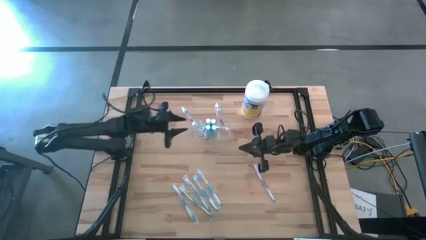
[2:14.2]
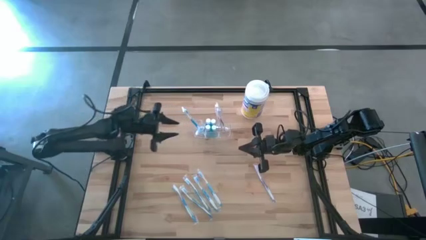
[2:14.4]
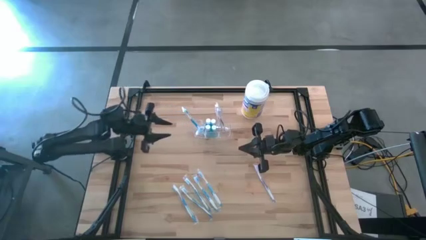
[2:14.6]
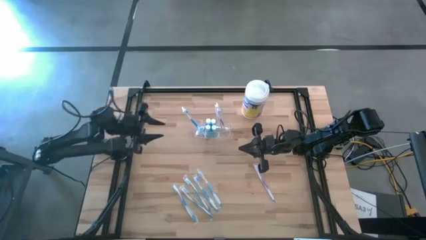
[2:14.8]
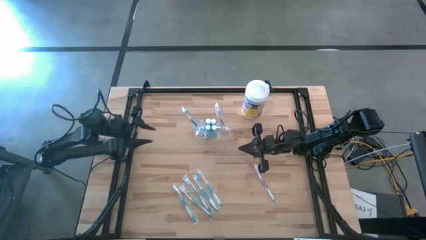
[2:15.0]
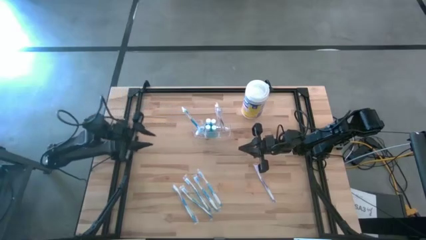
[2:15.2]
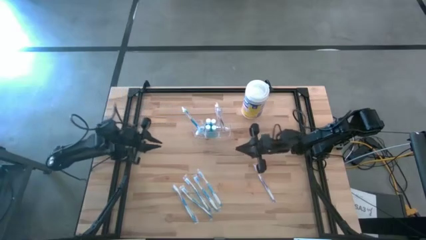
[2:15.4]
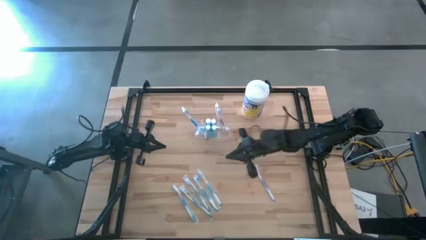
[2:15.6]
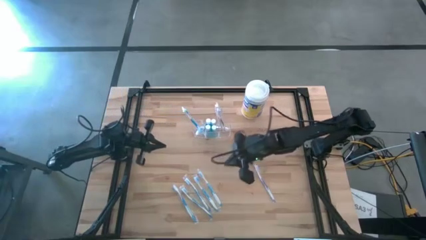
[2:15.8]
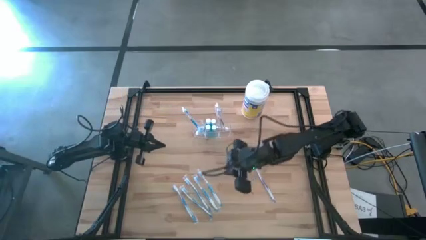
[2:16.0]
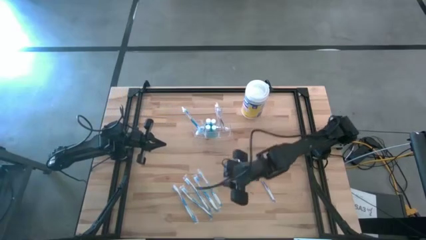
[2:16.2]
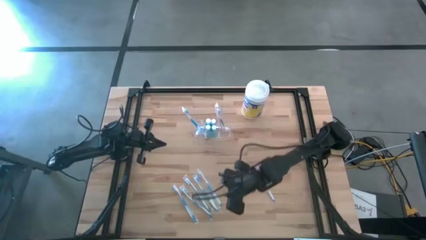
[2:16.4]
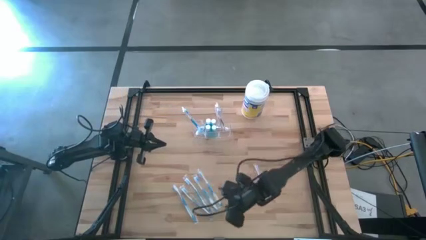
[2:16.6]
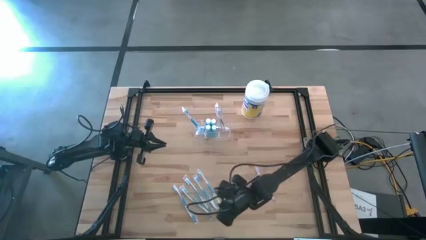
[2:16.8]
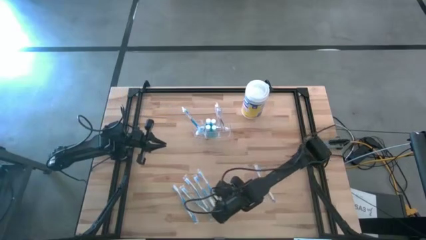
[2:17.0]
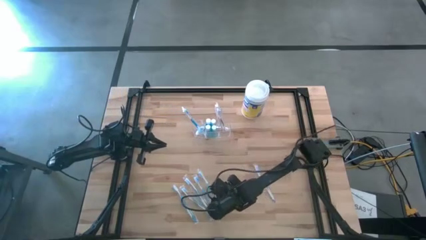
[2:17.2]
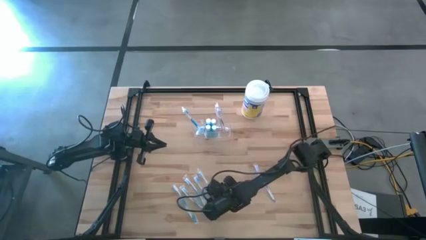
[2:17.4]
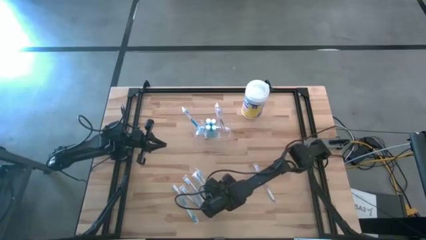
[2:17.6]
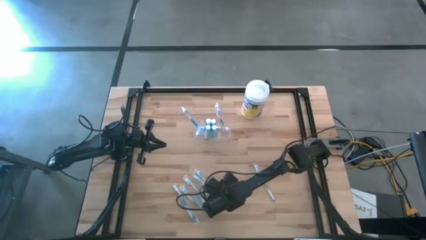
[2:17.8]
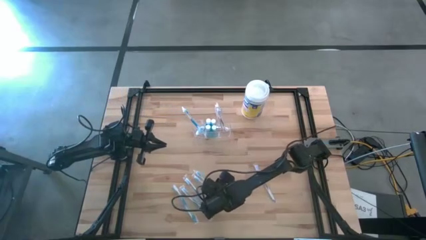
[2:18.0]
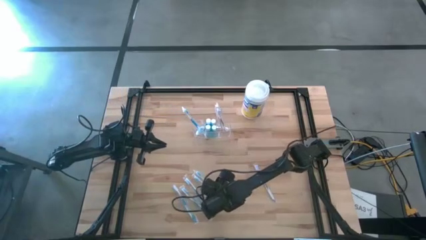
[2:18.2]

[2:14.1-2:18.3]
Task: Pick & Place toothbrushing station
Put the blue toothbrush into the transparent organizer

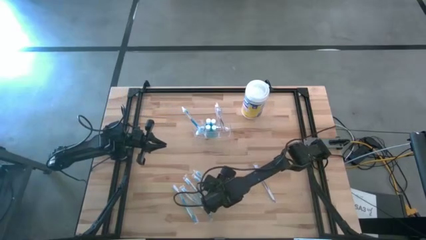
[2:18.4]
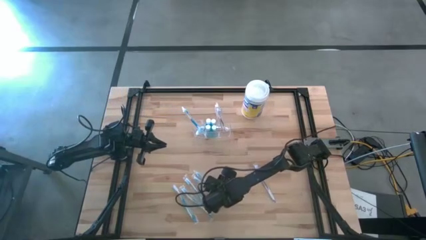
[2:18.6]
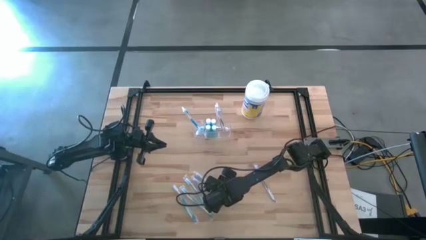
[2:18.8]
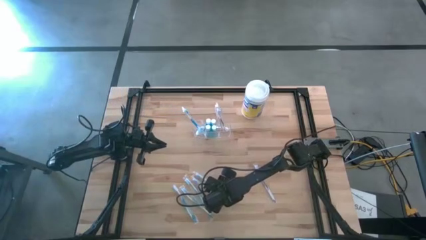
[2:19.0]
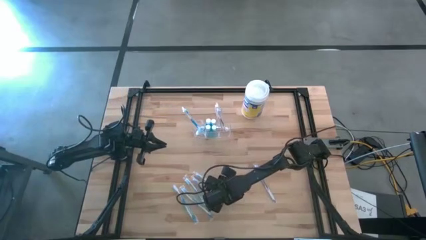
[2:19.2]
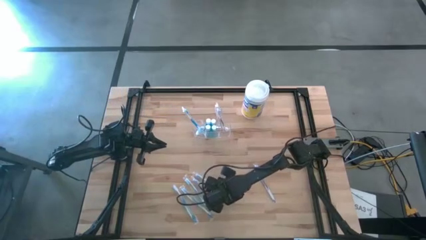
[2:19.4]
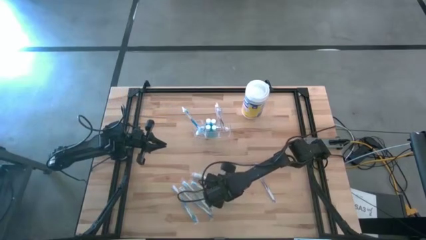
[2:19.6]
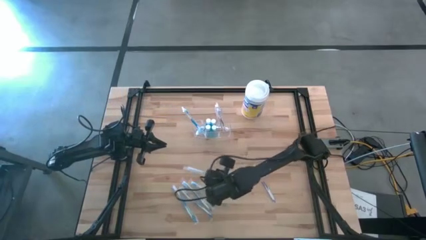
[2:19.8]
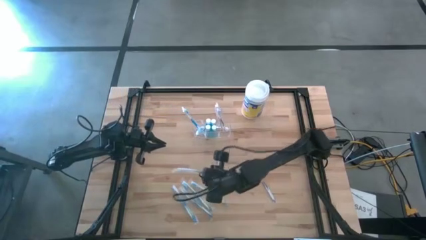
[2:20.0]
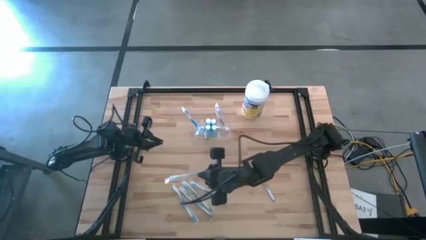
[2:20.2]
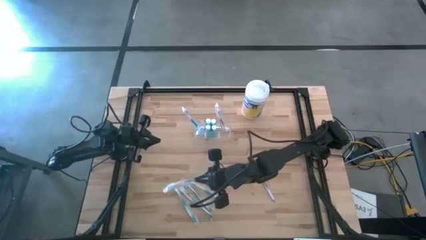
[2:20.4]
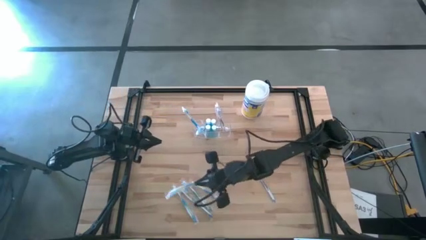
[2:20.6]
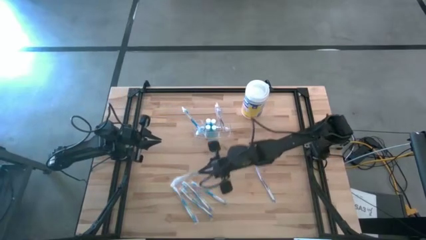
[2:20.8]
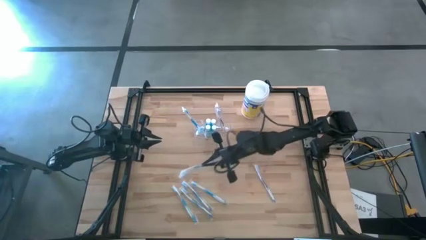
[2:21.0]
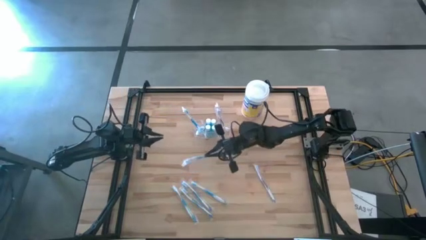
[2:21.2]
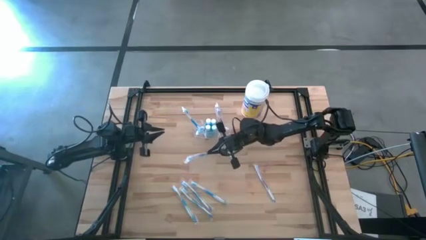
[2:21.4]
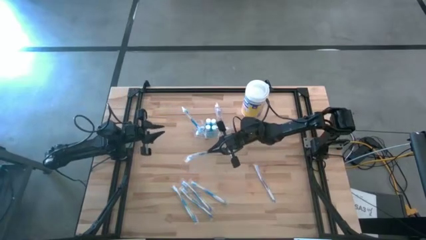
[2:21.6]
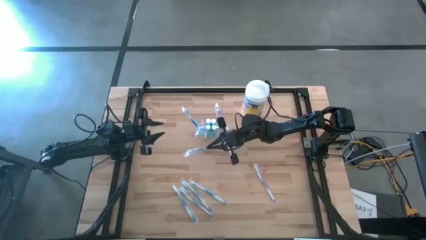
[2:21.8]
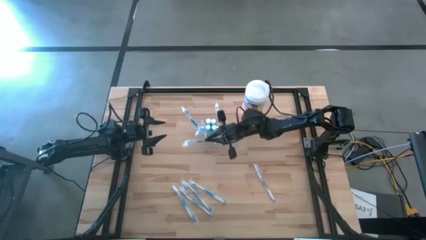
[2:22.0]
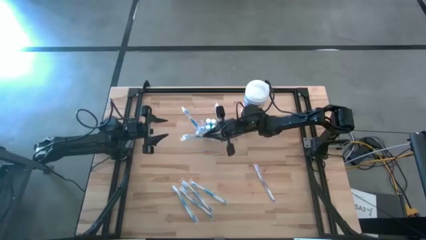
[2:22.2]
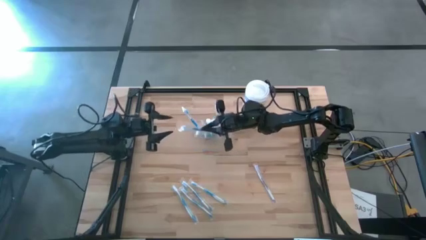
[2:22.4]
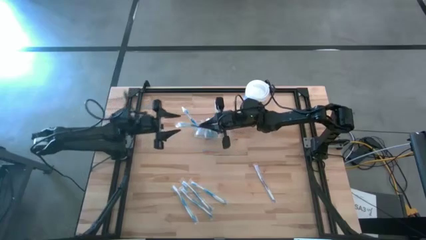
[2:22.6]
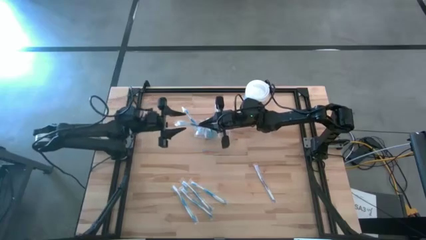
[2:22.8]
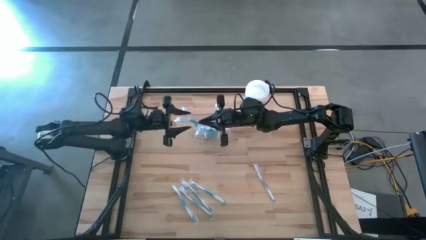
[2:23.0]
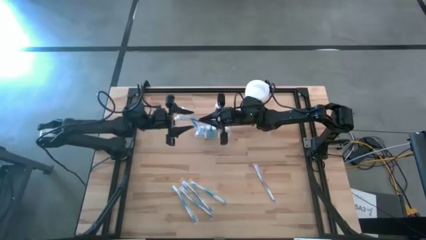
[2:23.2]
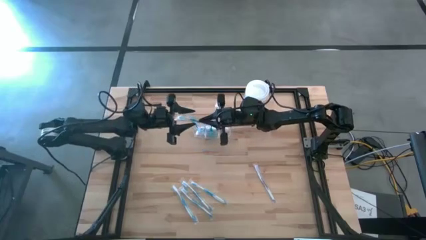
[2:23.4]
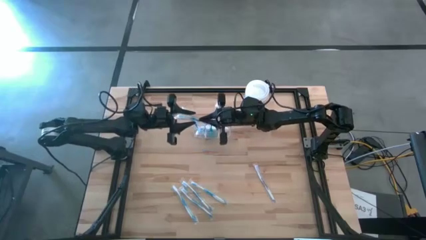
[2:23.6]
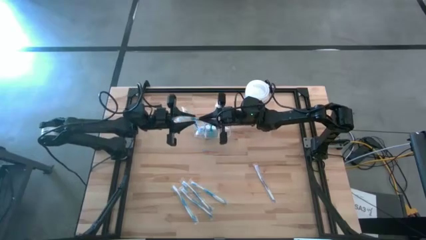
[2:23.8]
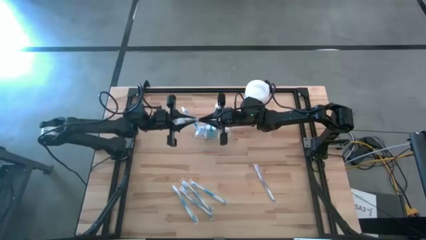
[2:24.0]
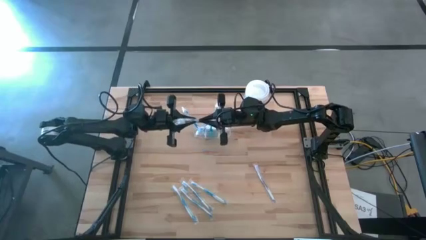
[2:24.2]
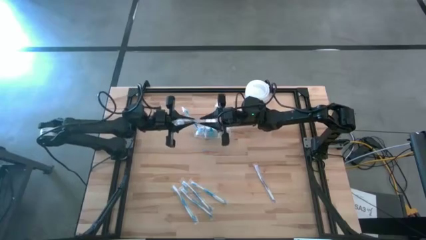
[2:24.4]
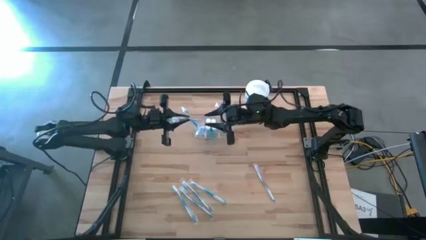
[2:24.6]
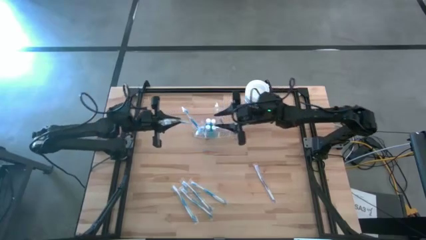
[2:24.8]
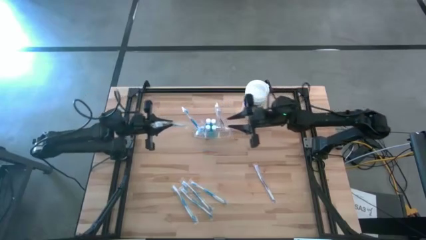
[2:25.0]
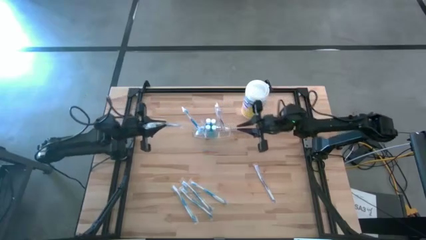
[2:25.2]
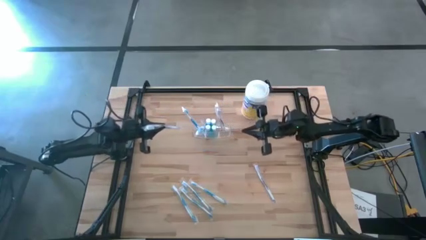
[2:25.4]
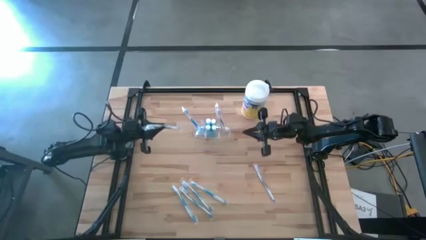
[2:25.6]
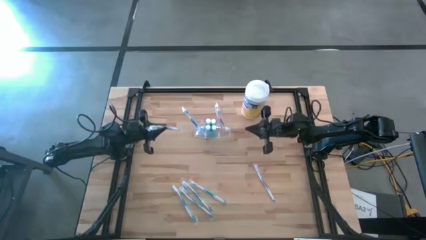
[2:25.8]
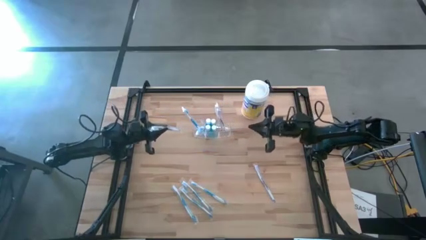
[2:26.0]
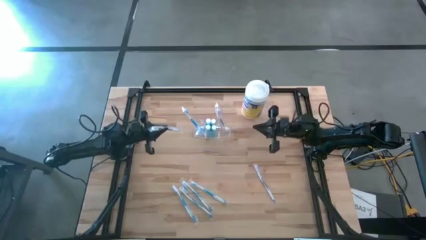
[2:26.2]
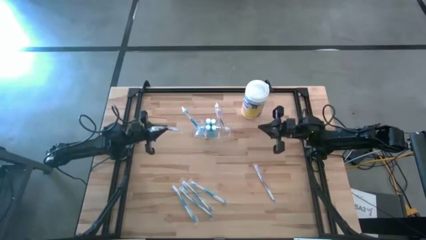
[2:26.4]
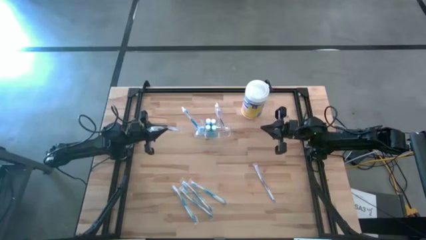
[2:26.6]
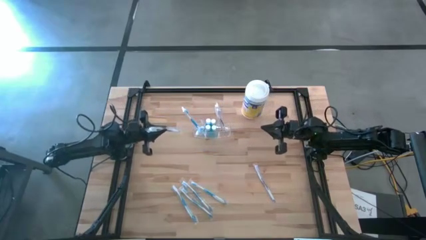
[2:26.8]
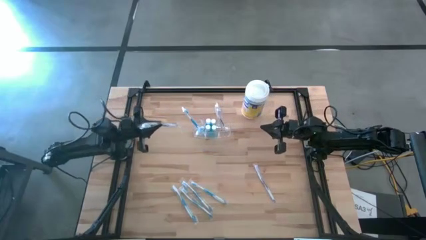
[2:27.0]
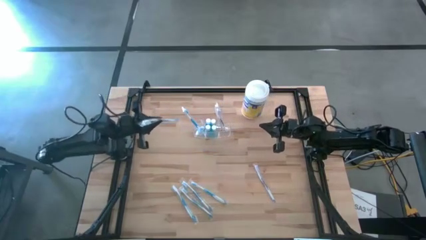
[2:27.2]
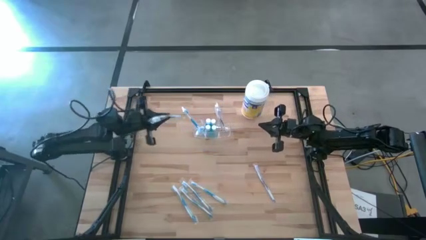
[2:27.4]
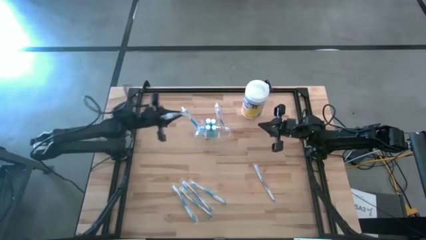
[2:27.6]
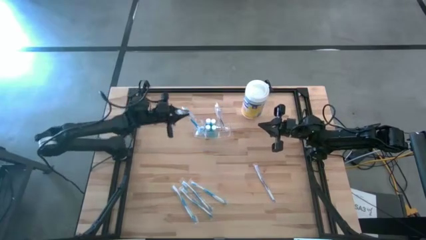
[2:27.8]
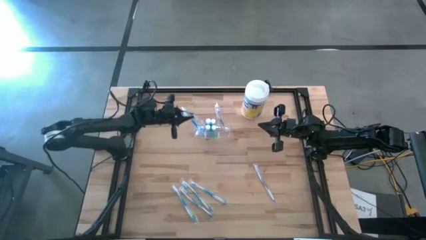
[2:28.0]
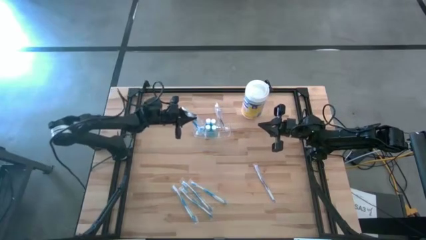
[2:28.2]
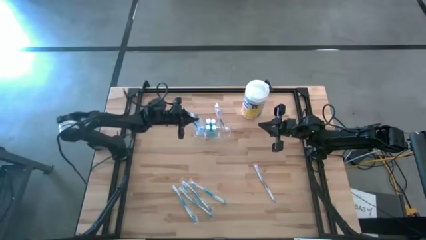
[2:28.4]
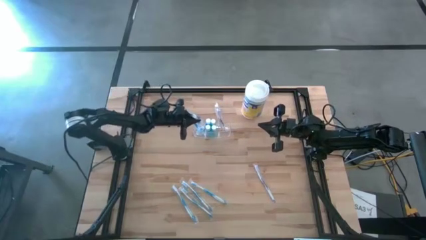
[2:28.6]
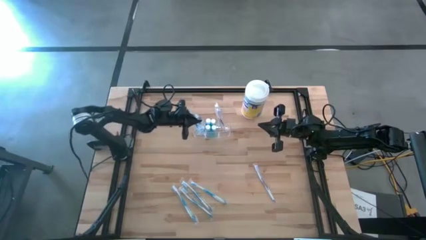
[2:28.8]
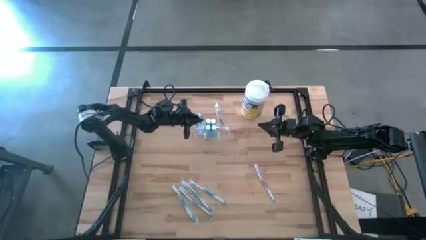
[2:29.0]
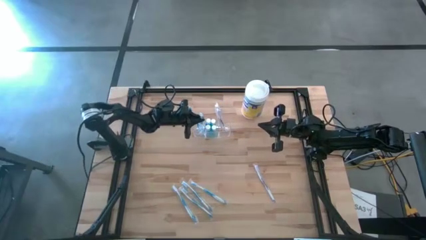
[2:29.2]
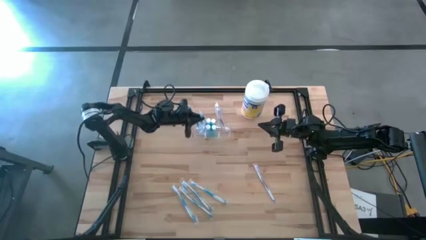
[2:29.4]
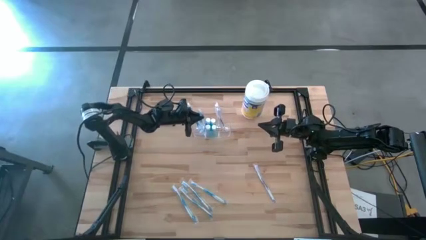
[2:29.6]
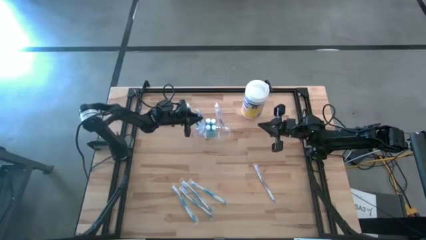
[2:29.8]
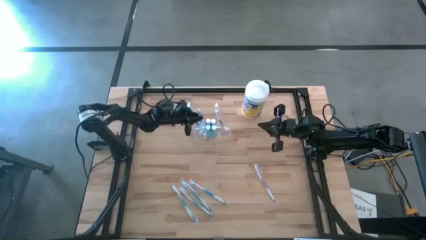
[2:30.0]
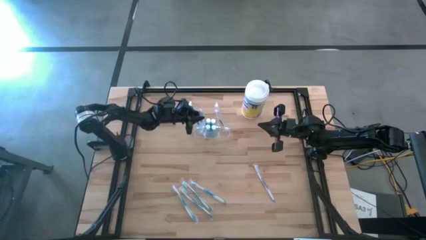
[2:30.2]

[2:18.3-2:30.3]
Put the blue toothbrush into the transparent organizer

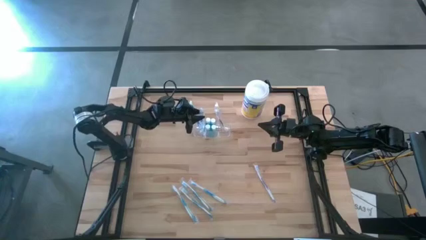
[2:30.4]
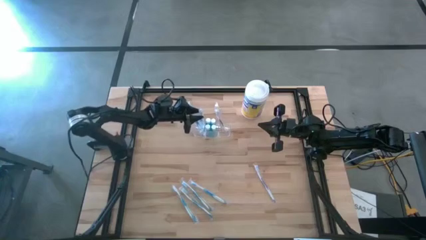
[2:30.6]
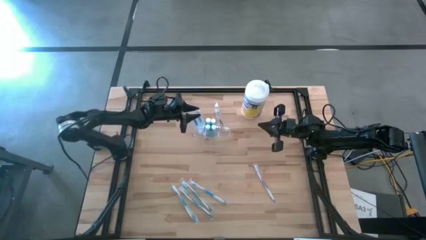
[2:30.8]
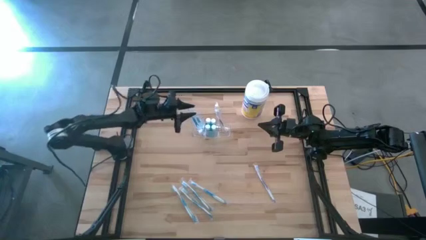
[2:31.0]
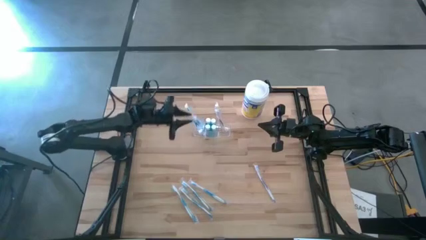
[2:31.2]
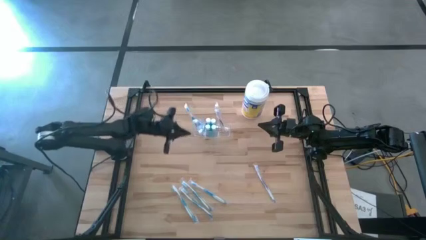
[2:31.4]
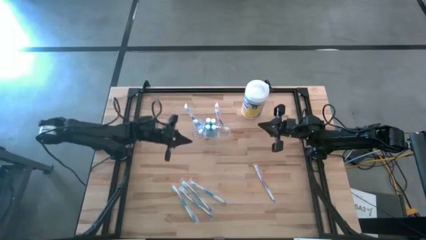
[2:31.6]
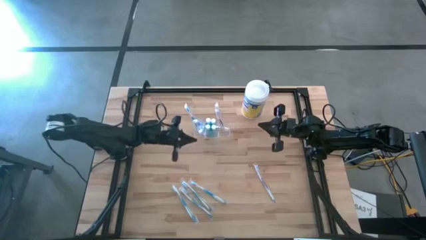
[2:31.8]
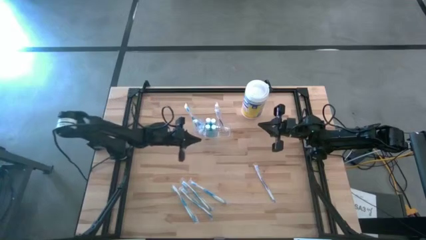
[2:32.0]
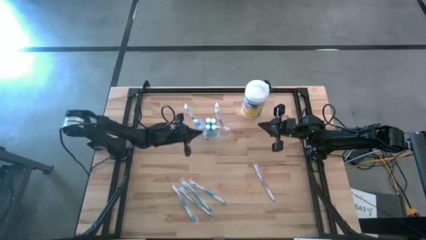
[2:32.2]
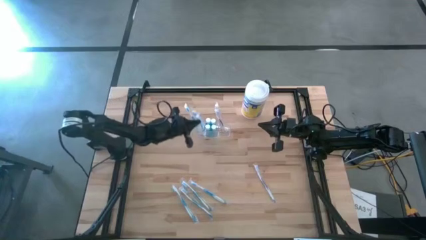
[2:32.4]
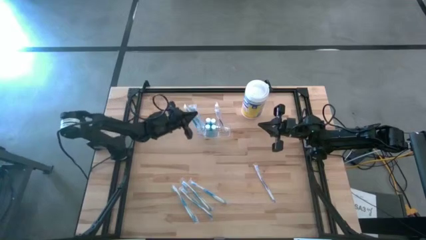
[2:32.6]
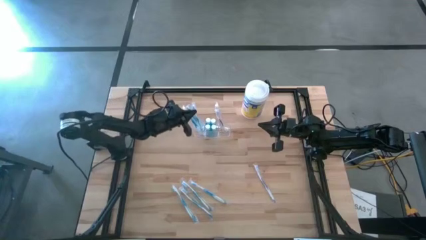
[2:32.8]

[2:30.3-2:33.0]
Adjust the blue toothbrush
